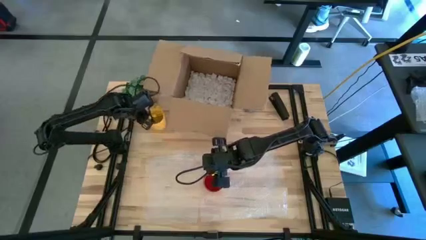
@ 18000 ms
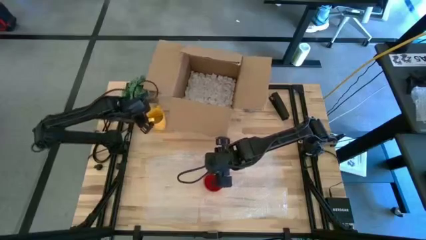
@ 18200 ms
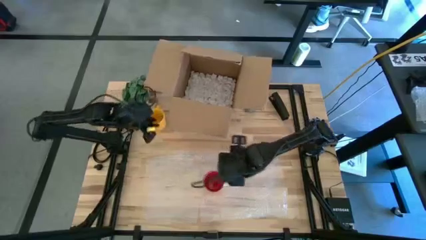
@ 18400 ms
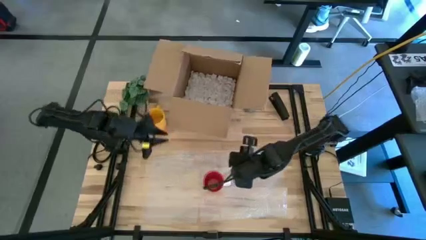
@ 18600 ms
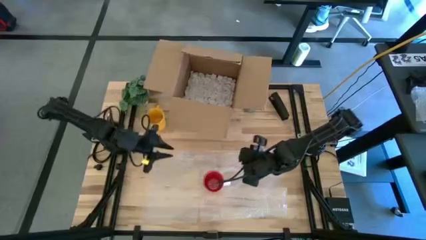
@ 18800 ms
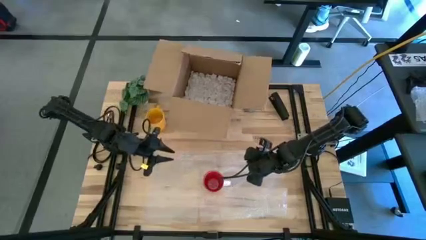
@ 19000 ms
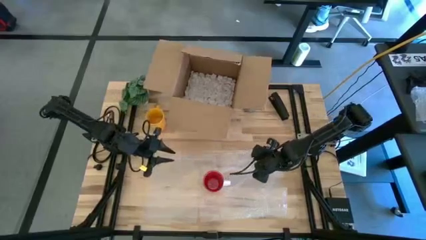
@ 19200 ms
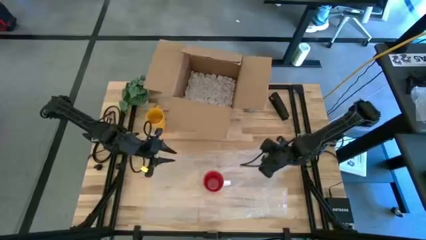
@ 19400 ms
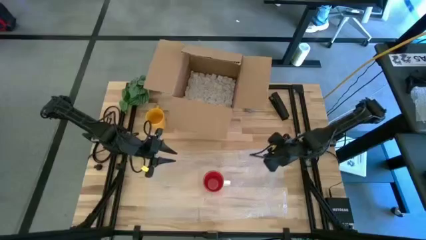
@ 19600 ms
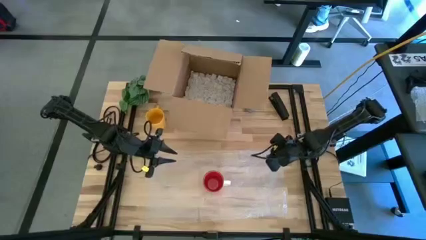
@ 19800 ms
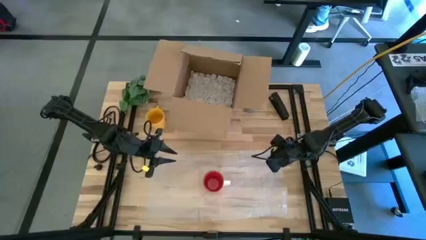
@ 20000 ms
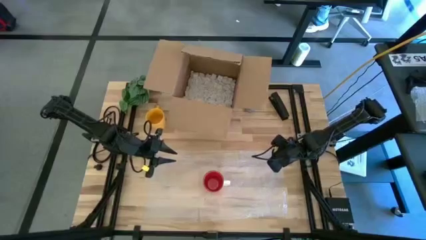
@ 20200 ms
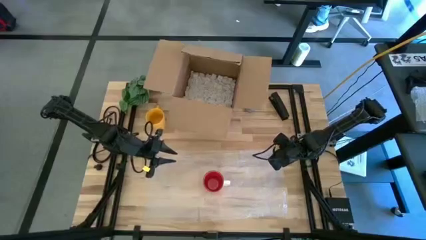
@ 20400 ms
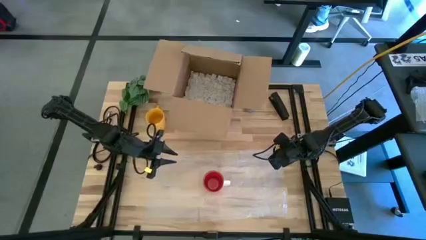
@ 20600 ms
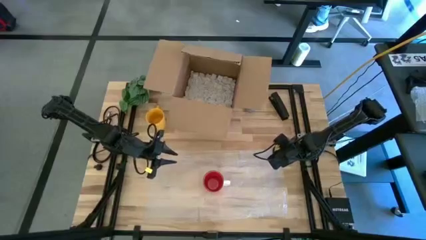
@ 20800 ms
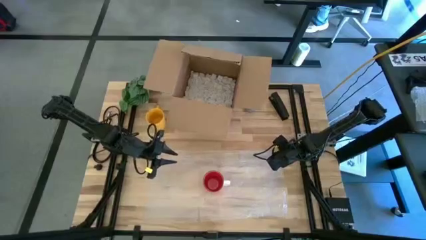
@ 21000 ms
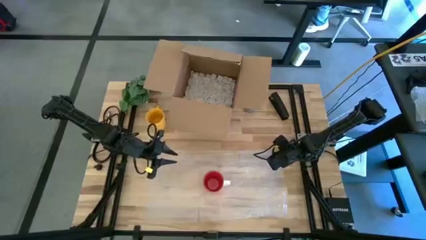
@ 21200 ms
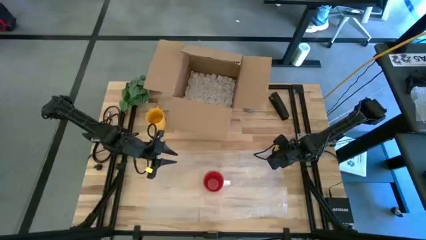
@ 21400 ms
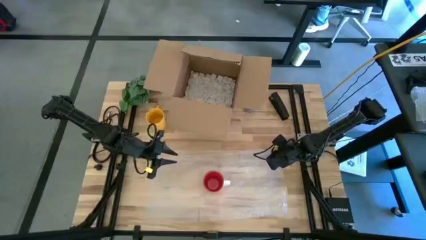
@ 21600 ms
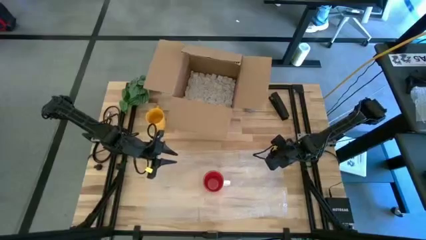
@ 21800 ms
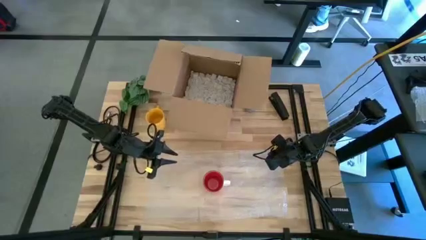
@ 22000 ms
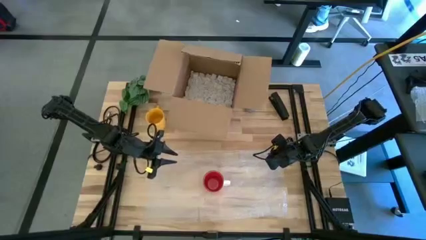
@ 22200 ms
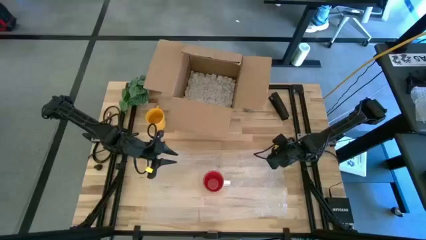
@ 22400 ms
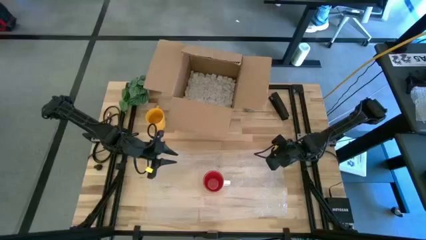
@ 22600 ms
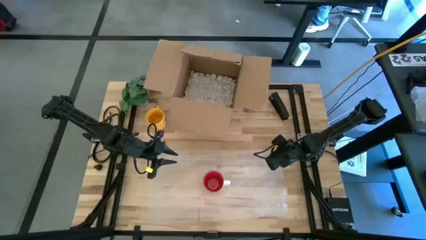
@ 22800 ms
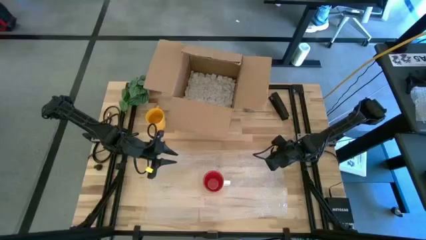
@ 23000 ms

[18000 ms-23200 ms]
Task: wrap mug
Wrap the red mug with the bubble wrap

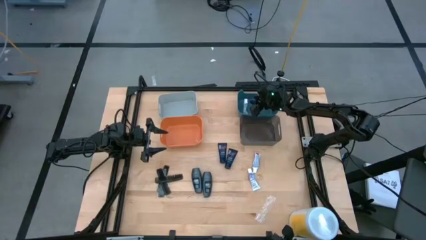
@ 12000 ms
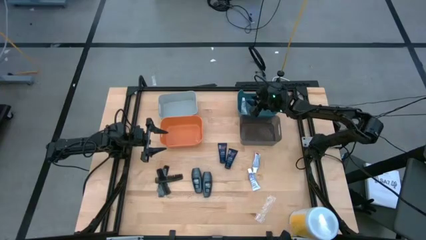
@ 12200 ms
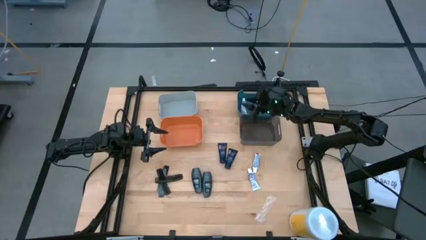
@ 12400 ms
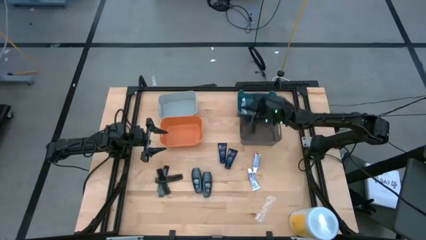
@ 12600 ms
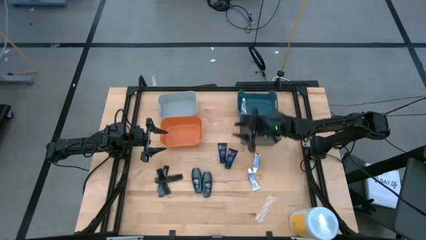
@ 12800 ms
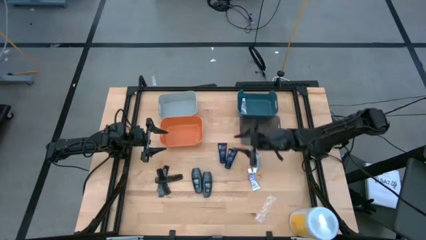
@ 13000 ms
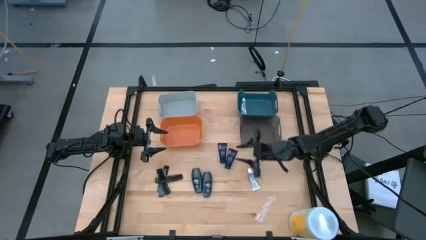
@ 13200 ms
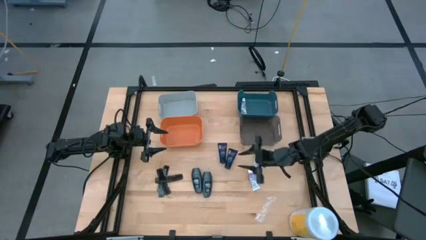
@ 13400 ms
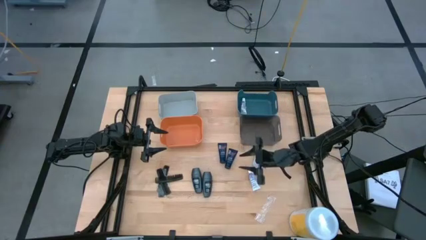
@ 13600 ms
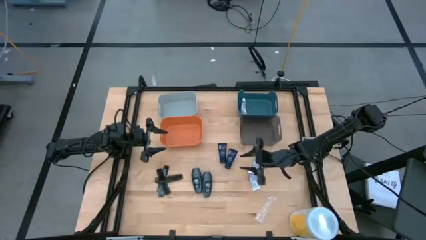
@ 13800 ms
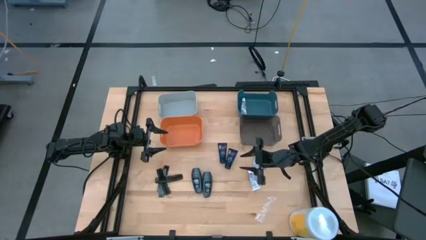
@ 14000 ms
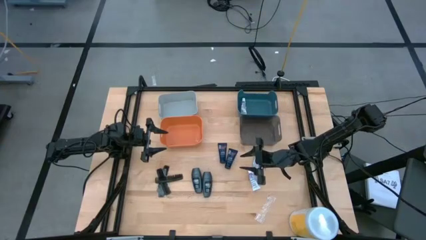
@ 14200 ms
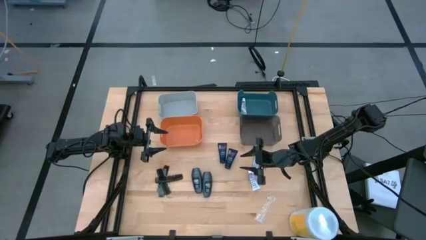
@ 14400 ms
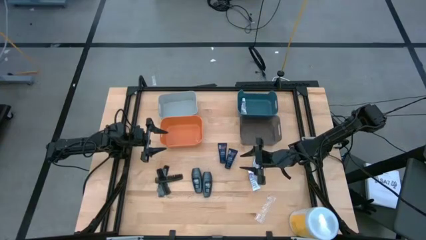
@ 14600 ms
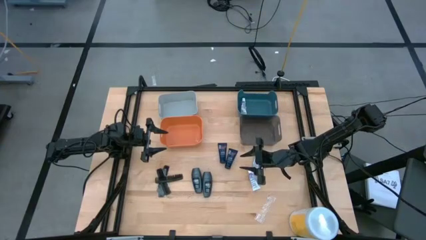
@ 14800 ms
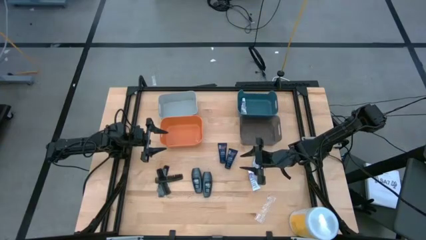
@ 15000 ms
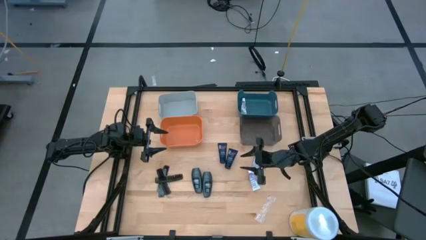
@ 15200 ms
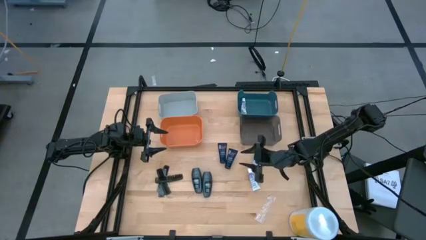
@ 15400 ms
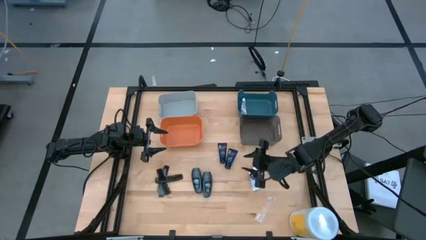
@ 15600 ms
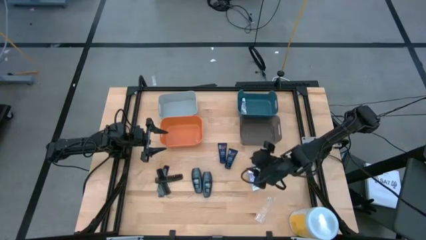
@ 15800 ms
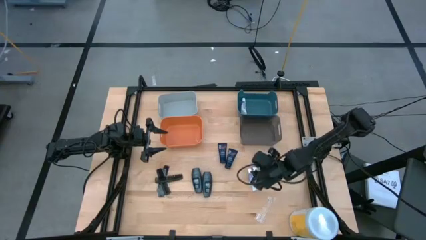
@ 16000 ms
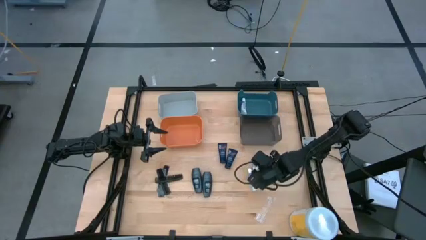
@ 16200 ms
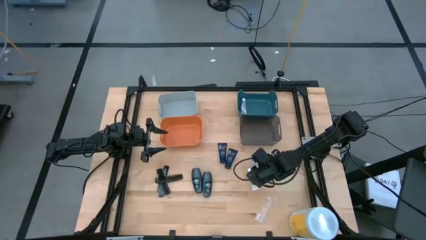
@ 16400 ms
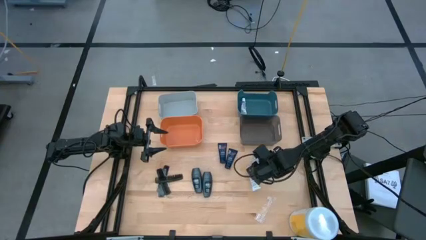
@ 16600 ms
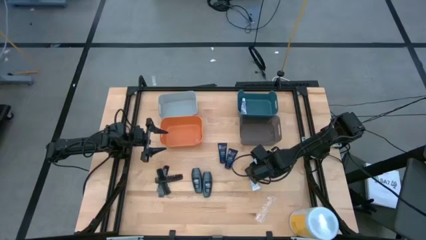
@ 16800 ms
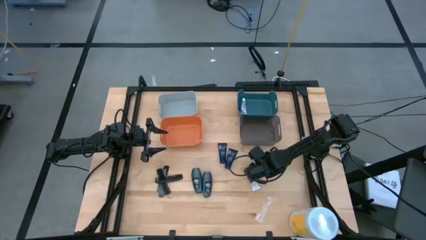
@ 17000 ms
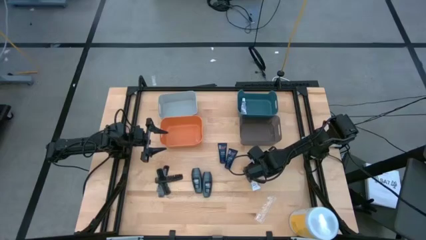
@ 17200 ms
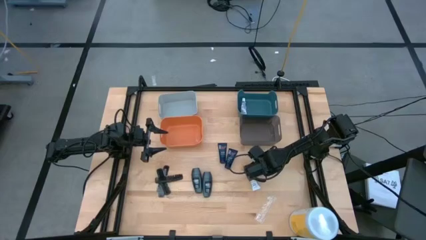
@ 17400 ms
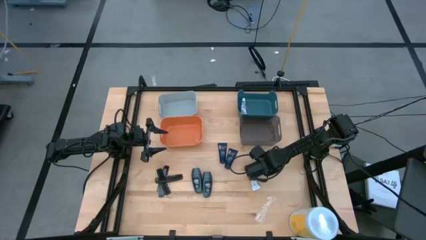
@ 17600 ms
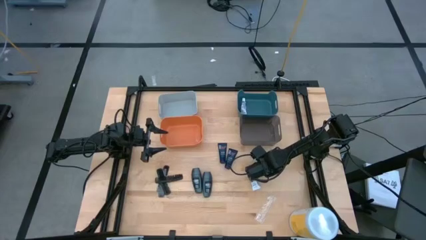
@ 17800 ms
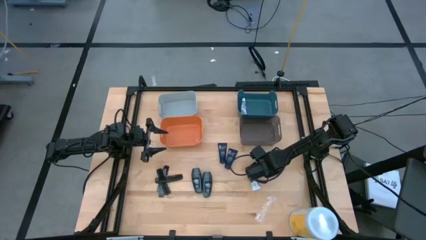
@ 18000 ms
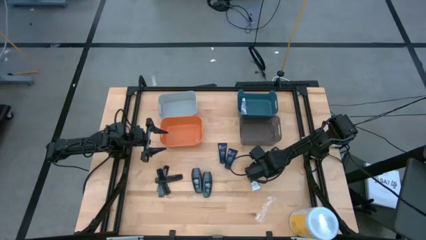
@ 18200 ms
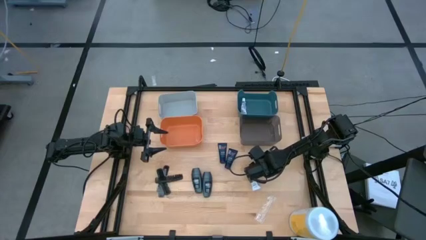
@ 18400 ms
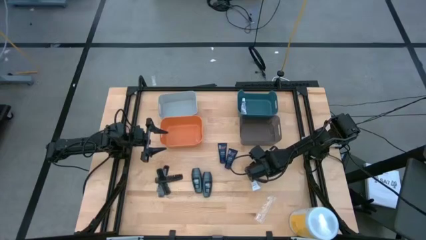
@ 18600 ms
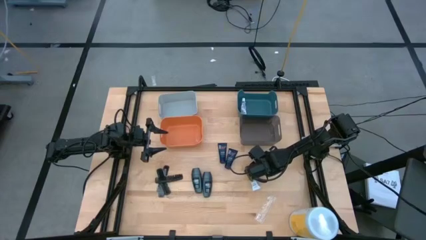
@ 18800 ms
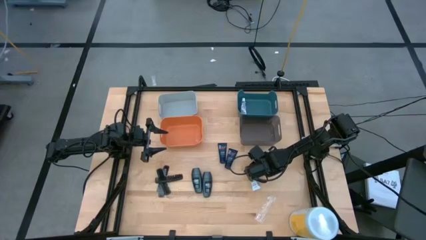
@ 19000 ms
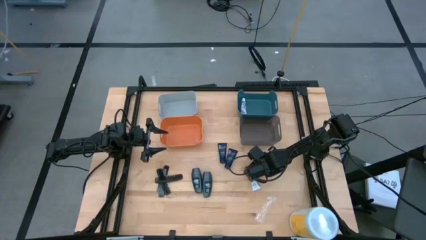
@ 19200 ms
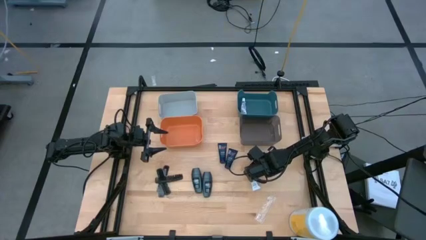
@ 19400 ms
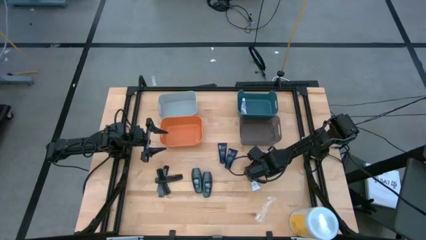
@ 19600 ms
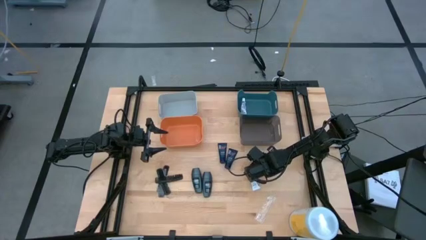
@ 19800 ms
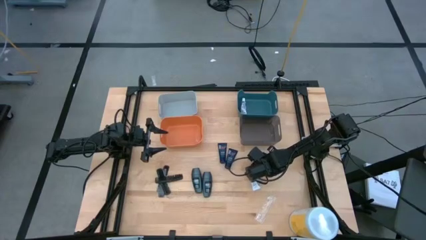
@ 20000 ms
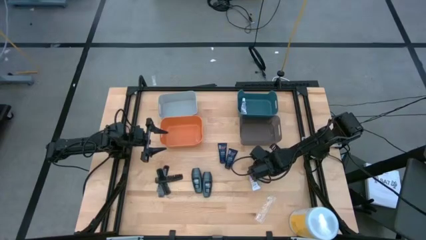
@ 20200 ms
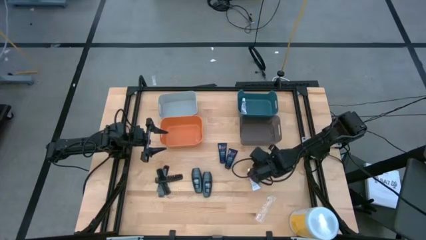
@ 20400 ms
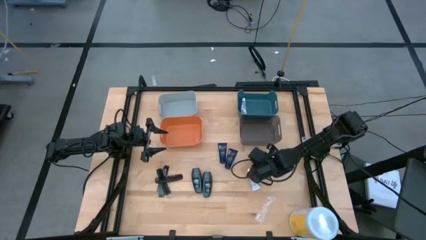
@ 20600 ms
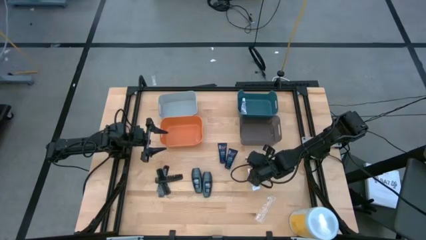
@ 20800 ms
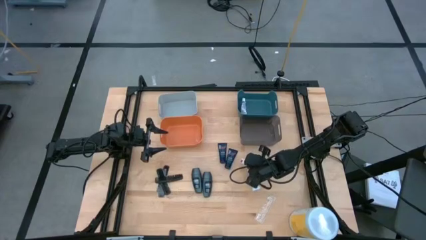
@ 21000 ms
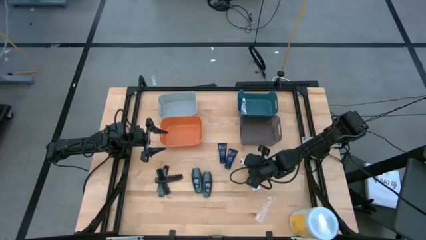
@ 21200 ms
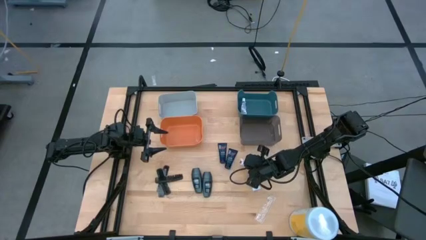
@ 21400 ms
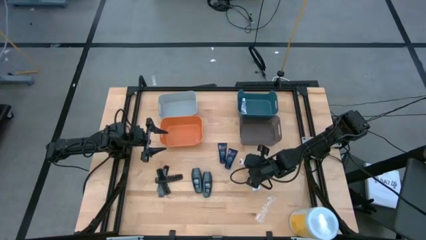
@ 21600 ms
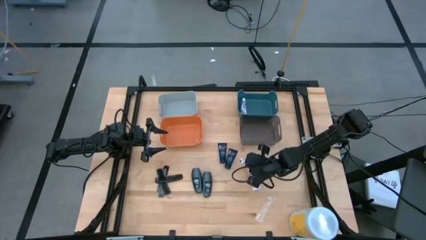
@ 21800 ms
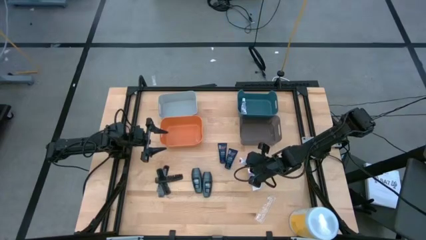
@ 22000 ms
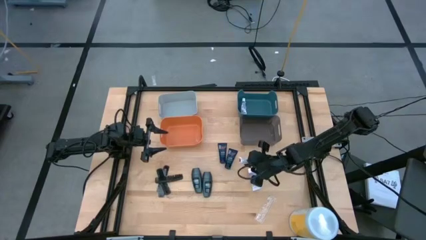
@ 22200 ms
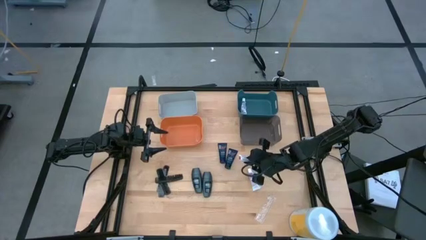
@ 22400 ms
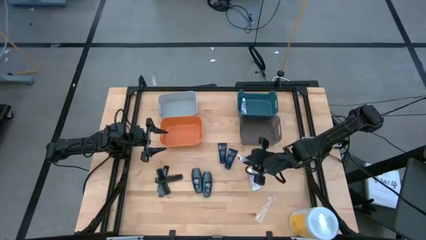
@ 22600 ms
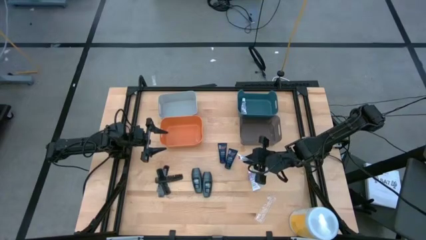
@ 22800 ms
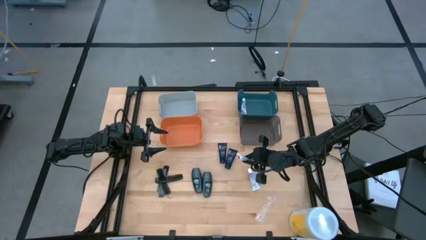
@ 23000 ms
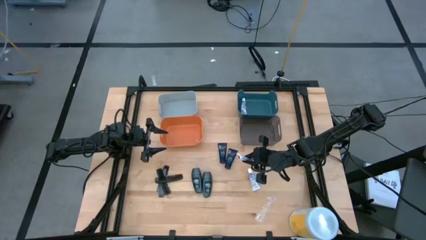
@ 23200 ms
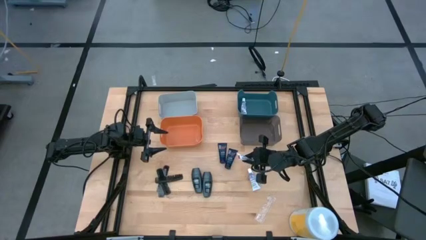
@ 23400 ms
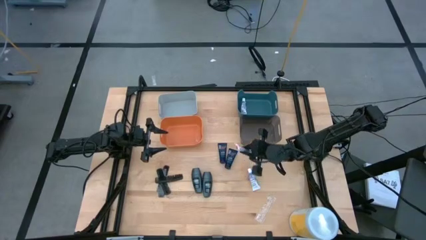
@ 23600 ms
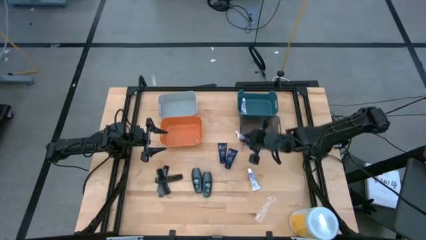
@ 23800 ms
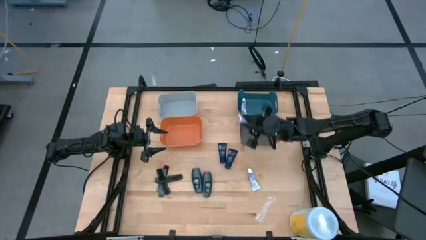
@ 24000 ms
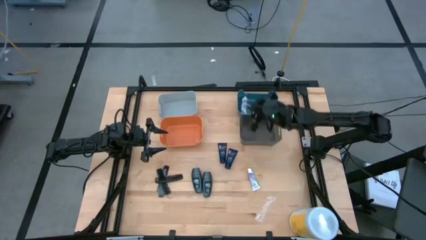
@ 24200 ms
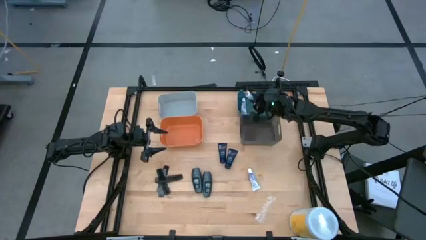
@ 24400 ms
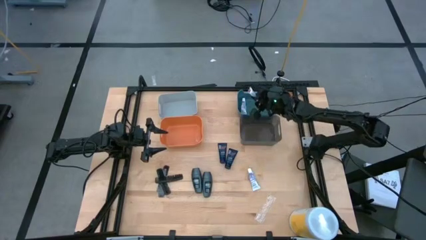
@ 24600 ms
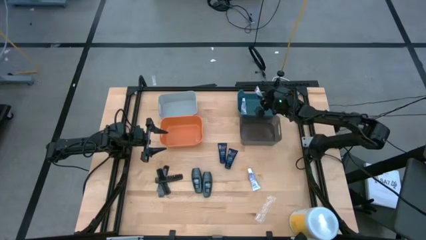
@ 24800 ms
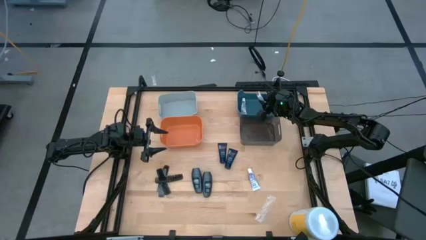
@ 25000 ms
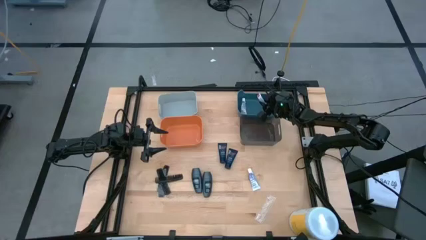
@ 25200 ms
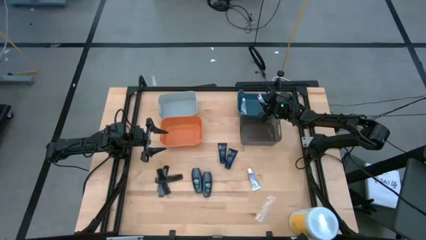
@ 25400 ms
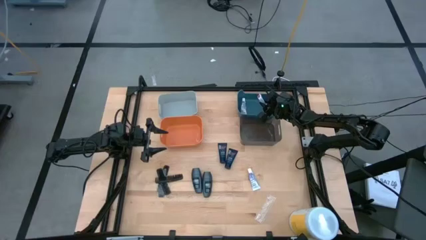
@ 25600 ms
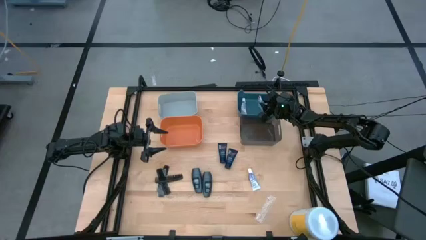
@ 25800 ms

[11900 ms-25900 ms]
Task: Pick & Place Travel size toiletries
Put the white toothpaste into the blue bin
